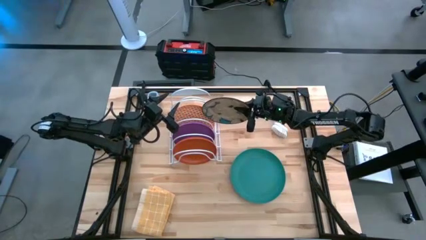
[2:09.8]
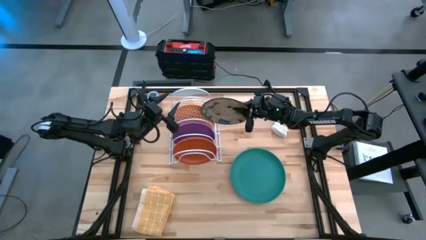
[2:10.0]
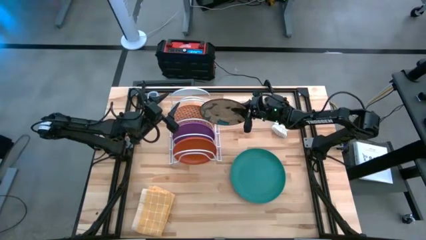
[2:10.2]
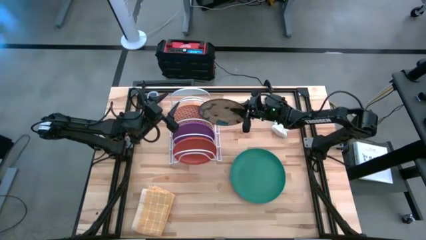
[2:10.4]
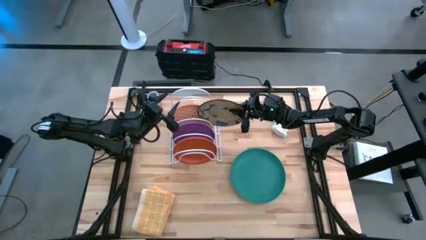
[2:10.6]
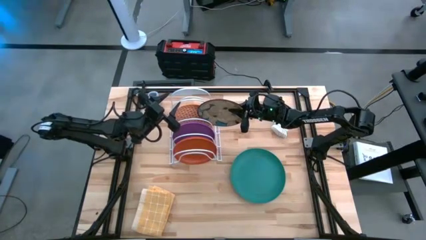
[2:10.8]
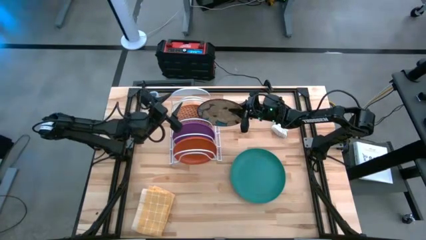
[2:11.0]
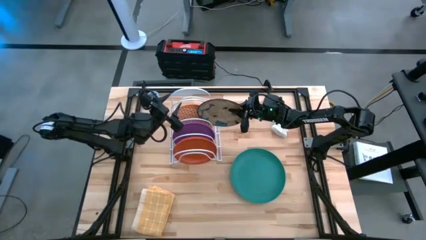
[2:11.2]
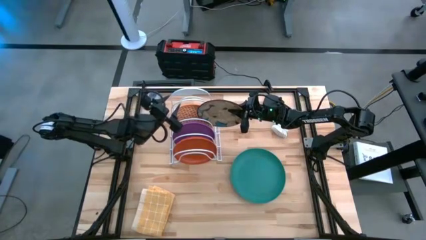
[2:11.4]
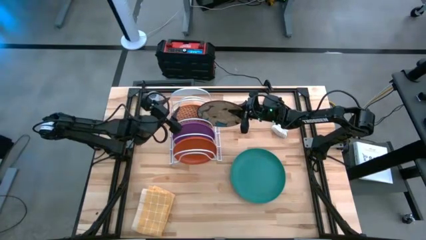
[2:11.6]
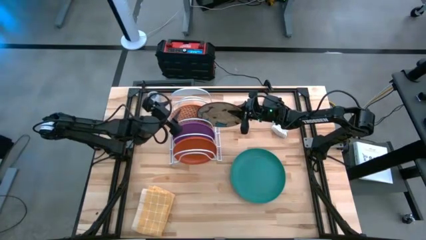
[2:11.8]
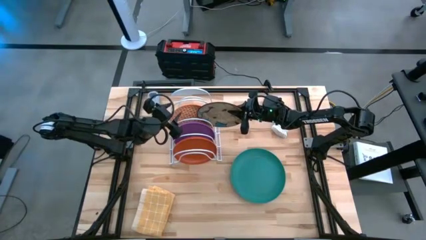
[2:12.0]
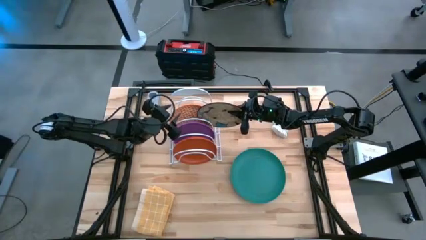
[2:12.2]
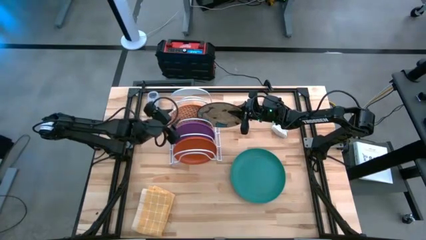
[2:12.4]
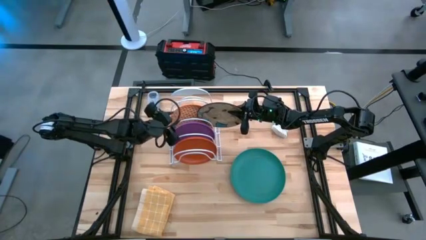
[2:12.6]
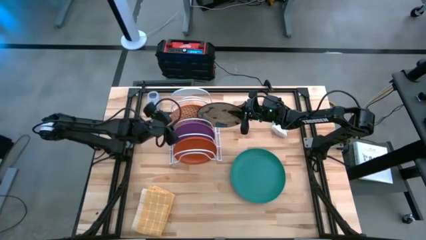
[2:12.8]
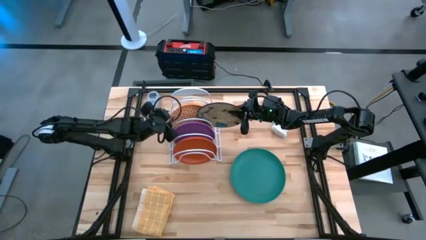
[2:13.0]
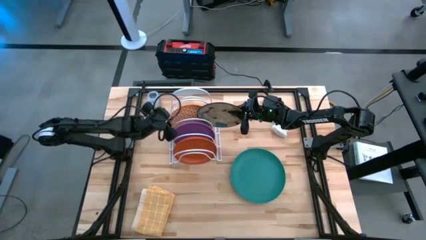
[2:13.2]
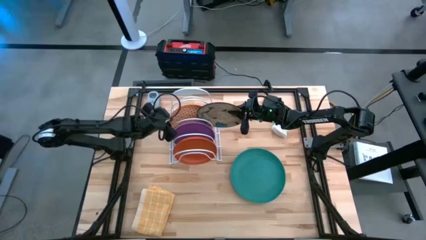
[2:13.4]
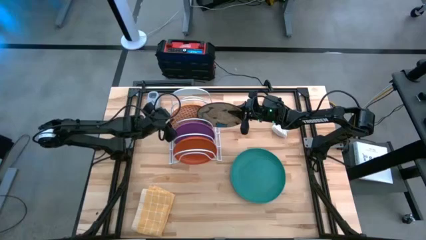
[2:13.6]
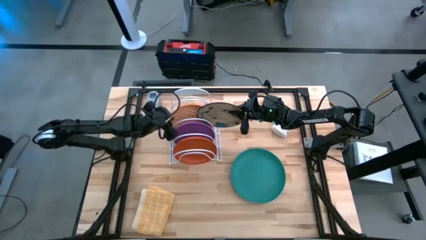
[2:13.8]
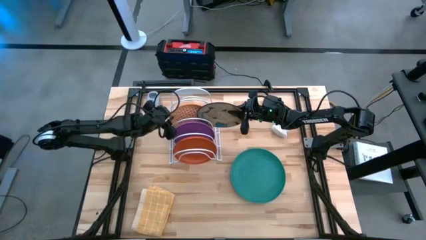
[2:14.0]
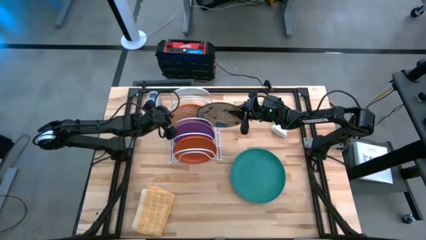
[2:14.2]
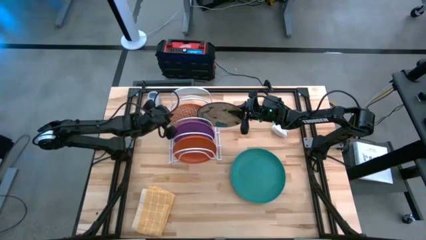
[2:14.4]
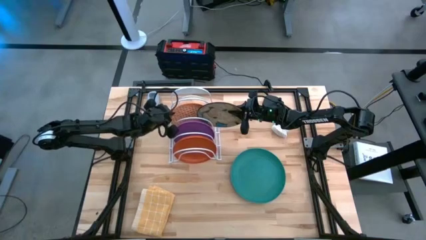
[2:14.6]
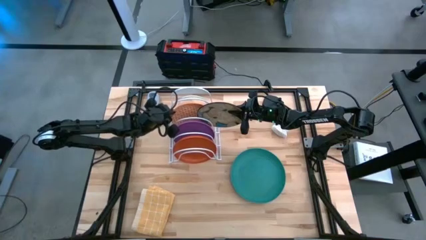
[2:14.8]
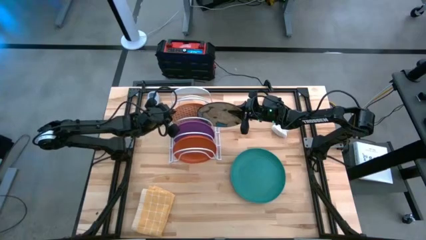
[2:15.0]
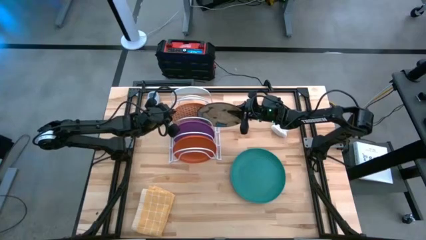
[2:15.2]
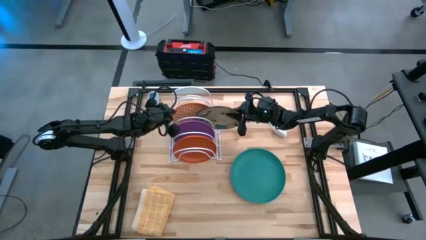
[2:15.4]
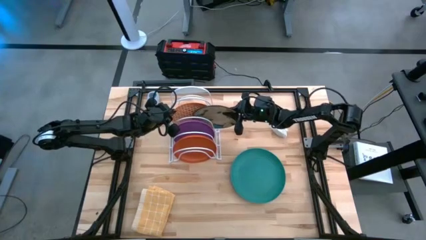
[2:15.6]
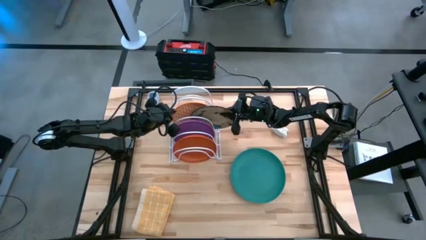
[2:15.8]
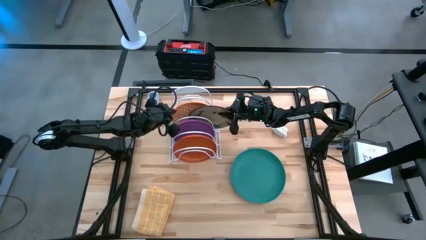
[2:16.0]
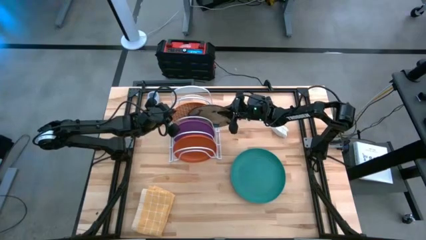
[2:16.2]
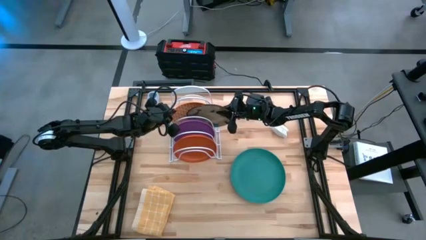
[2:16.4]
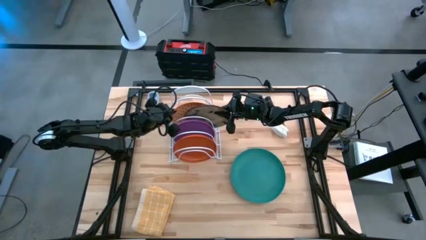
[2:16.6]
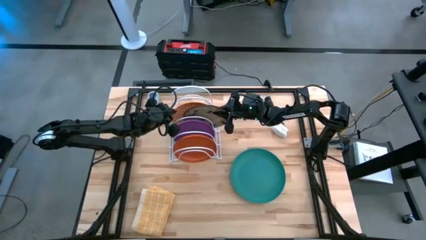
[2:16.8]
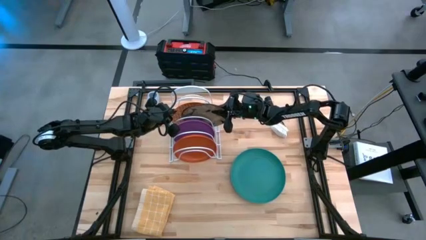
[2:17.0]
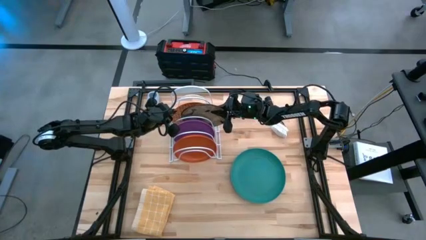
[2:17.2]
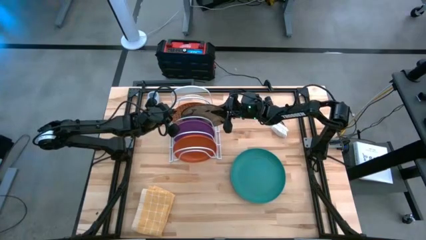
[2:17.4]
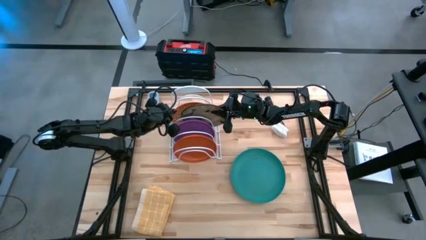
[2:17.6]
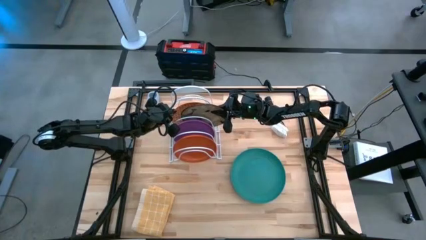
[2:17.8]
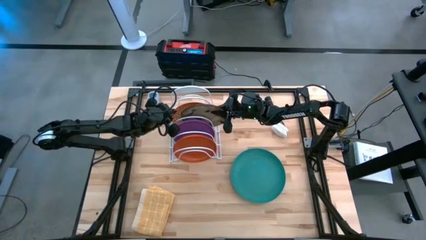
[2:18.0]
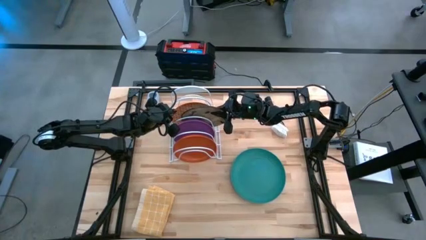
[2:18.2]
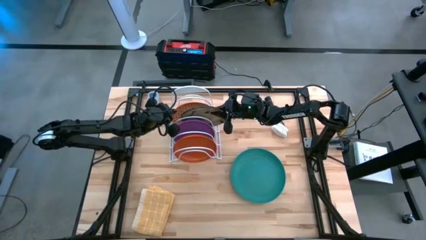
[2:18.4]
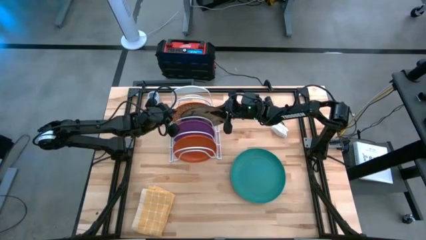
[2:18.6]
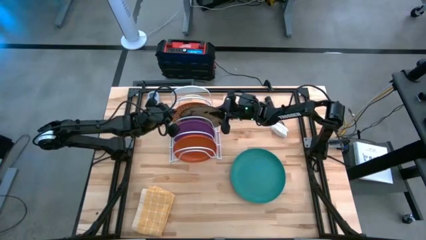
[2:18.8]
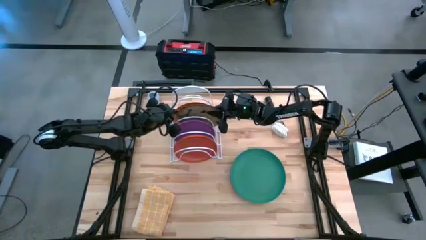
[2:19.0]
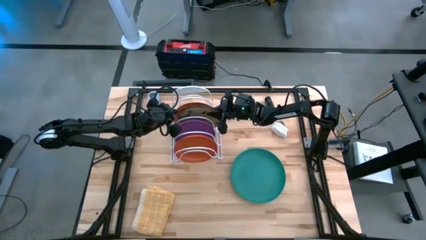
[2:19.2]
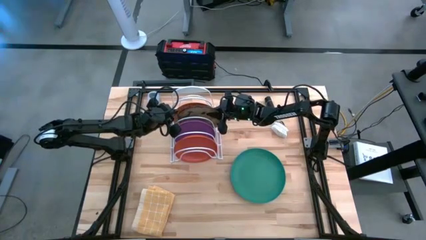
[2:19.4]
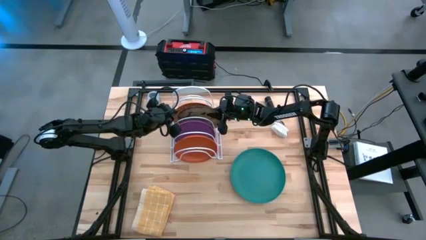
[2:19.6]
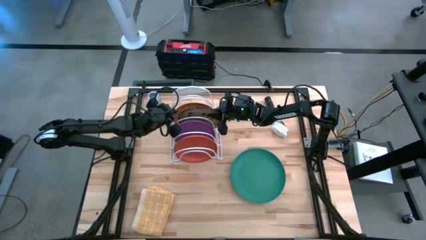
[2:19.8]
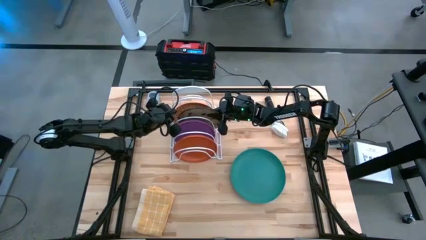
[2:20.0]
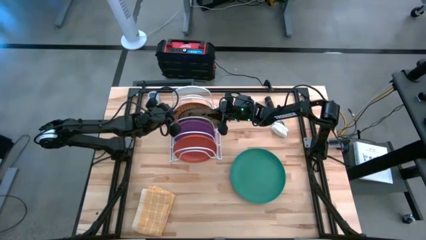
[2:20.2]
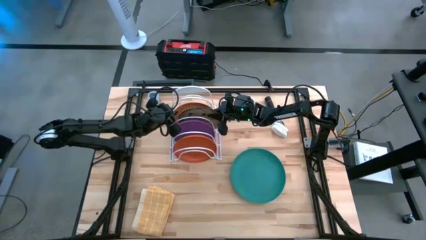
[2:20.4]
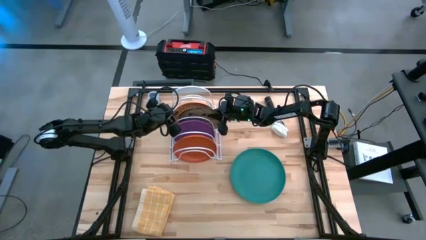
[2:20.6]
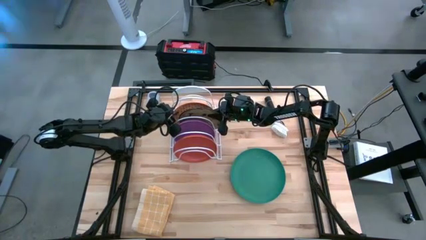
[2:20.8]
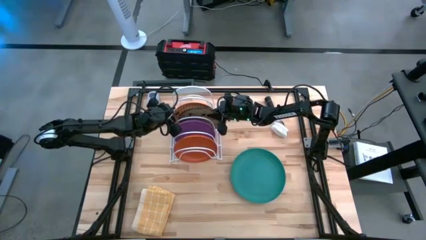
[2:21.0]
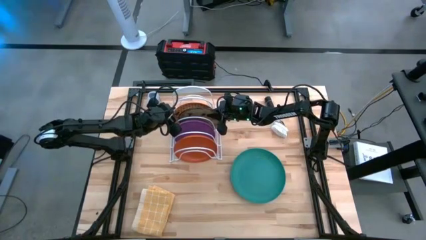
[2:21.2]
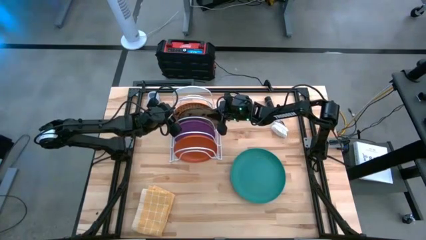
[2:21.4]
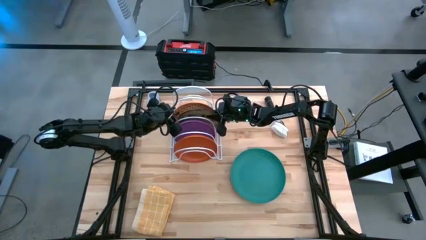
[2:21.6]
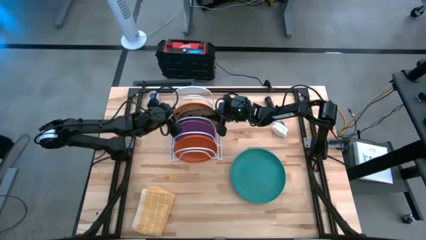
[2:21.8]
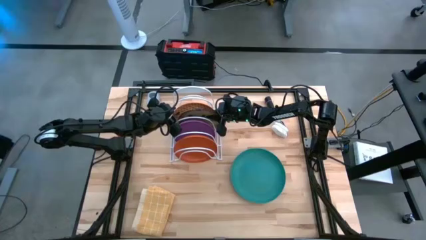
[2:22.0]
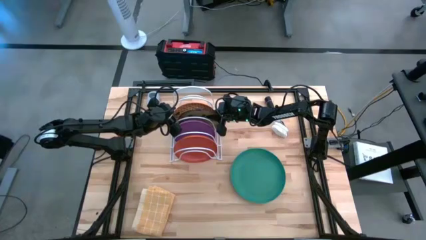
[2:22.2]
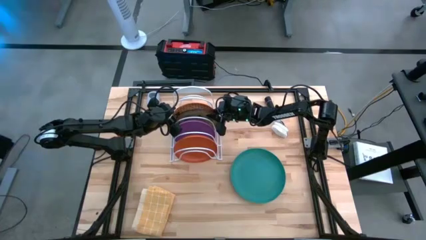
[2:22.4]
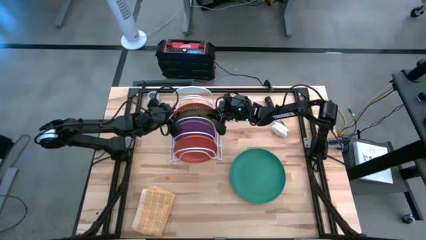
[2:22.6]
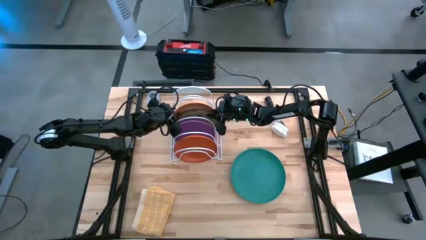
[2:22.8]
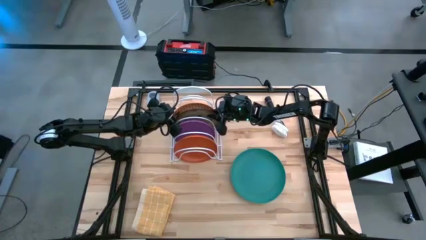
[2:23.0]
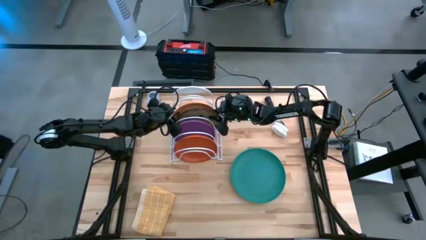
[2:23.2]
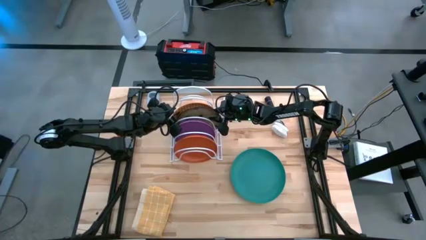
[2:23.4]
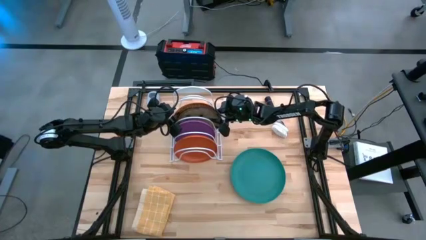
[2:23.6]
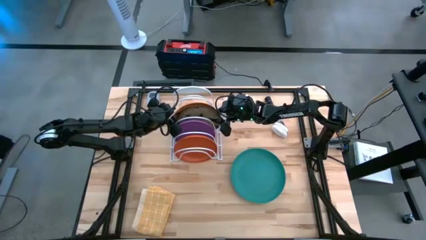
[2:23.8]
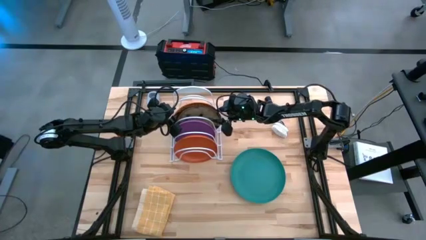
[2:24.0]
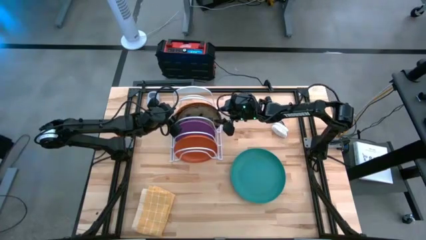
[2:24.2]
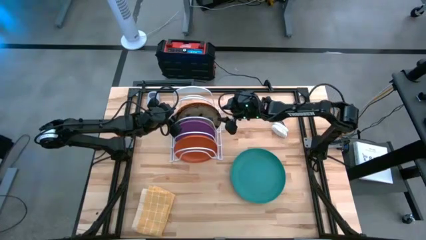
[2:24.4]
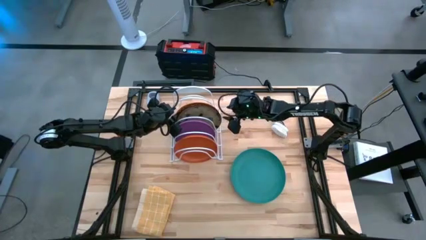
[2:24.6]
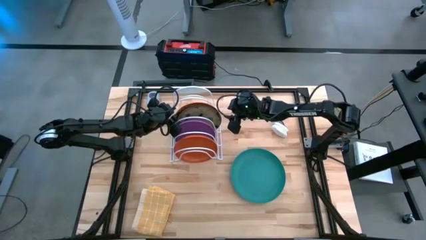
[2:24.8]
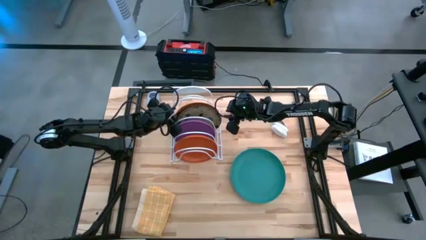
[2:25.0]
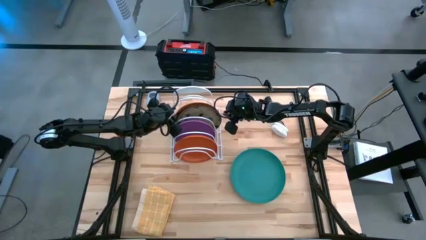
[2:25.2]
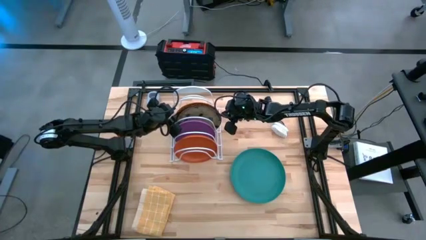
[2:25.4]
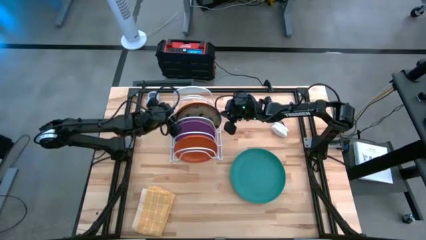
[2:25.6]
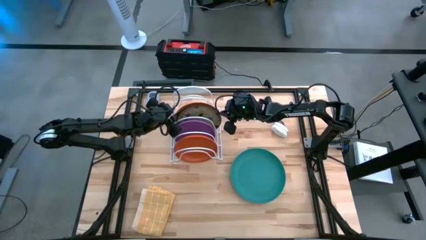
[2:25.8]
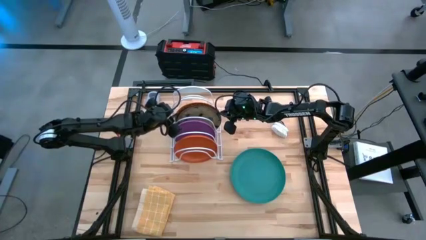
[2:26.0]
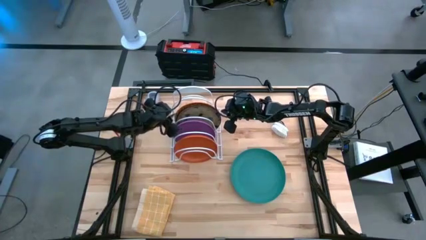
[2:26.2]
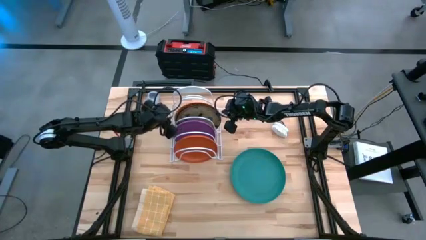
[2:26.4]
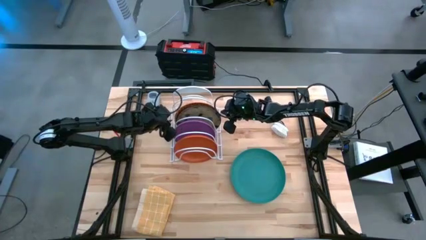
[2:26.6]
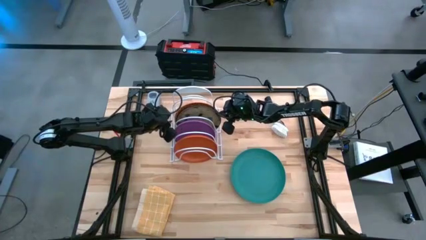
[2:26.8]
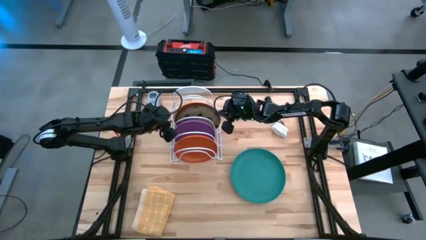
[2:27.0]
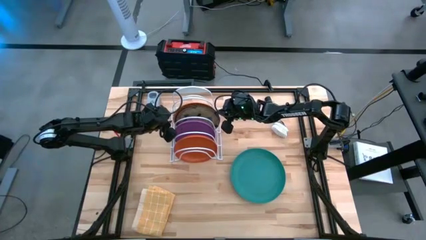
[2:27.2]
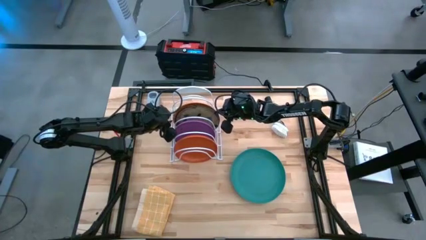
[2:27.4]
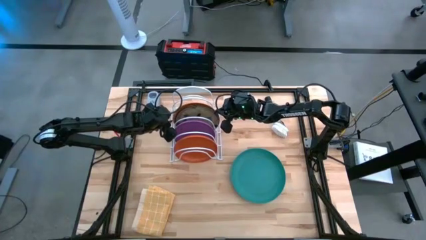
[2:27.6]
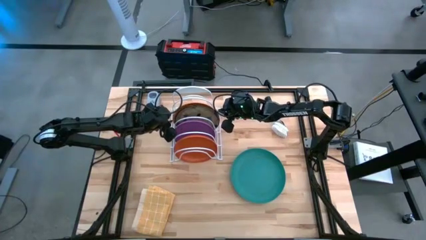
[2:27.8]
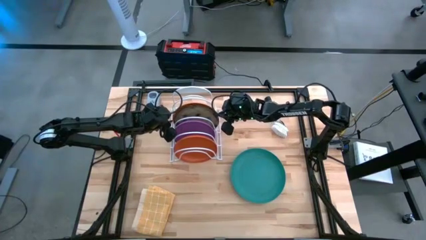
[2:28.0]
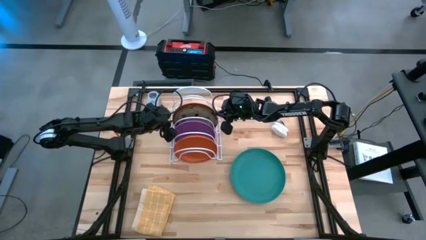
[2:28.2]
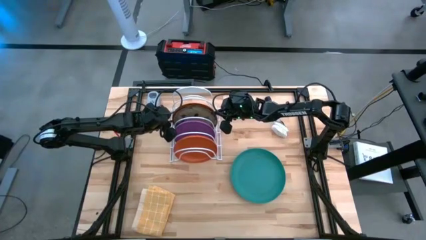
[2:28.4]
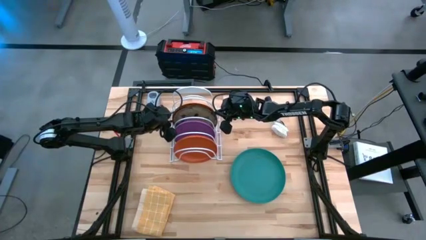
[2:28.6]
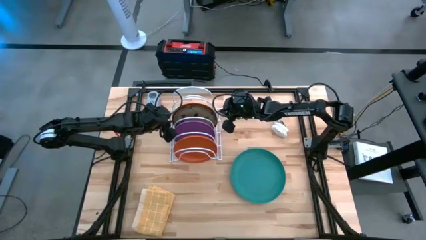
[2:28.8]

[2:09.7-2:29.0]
Task: Sort dishes
Put the white/blue plate into the dish rack
